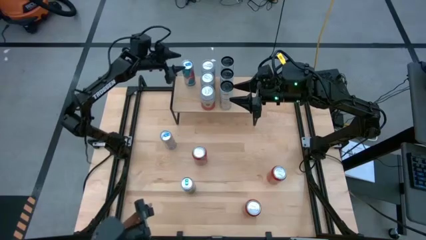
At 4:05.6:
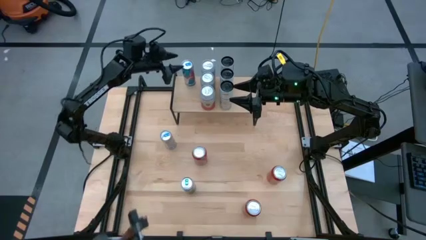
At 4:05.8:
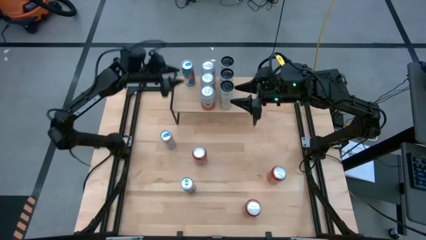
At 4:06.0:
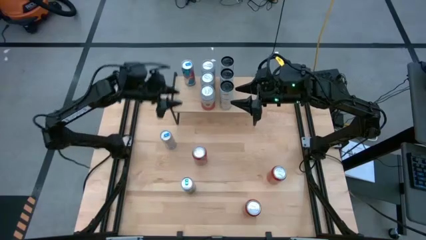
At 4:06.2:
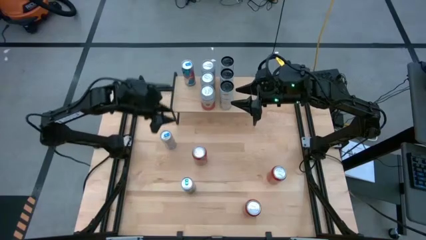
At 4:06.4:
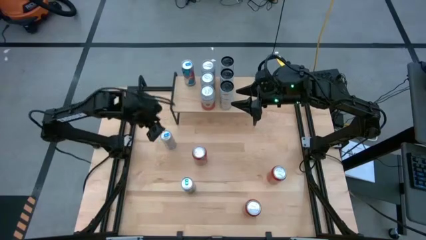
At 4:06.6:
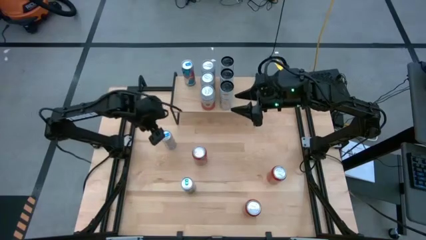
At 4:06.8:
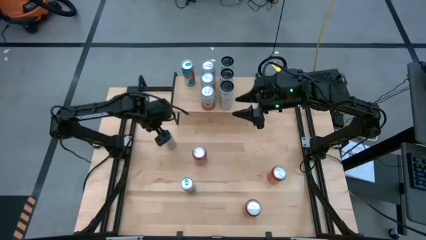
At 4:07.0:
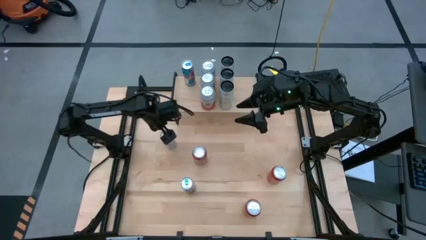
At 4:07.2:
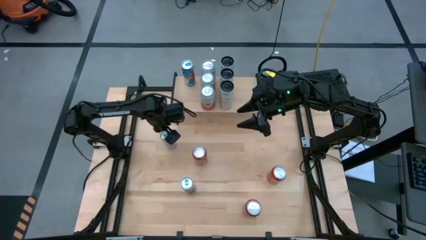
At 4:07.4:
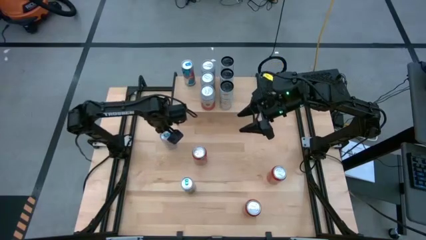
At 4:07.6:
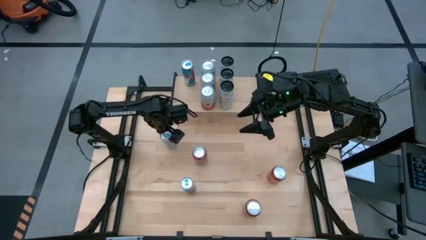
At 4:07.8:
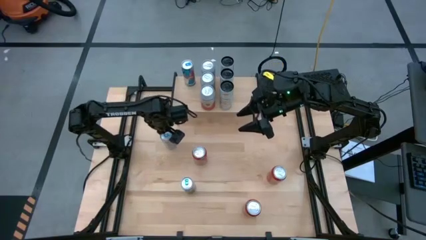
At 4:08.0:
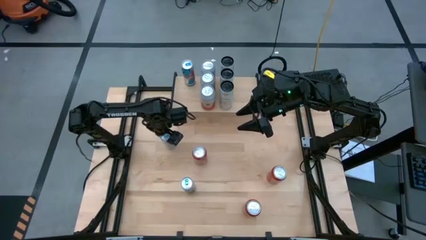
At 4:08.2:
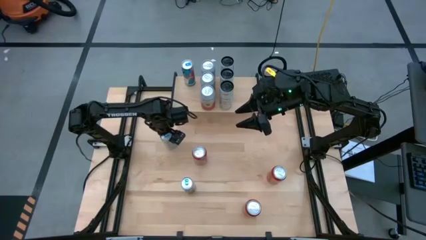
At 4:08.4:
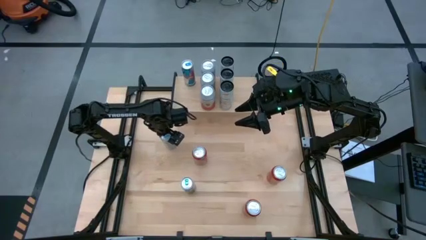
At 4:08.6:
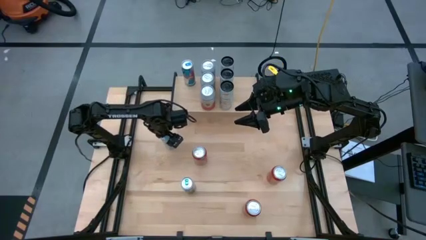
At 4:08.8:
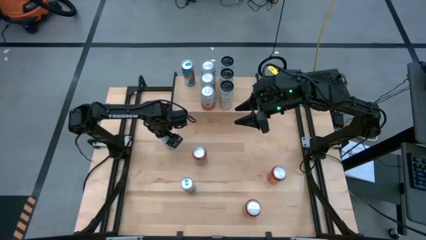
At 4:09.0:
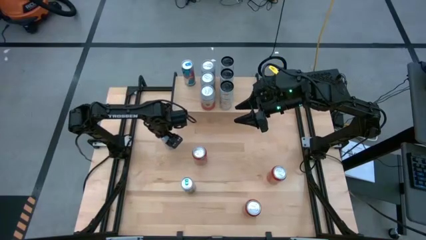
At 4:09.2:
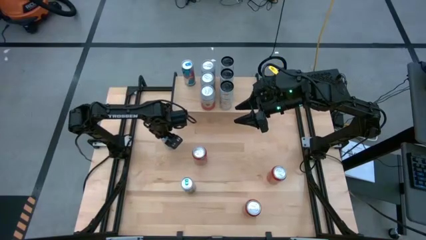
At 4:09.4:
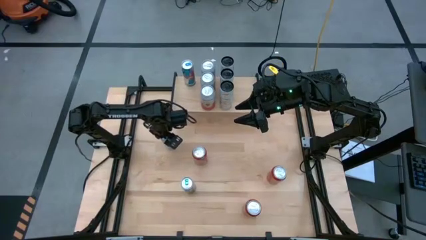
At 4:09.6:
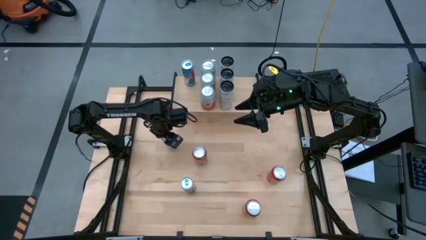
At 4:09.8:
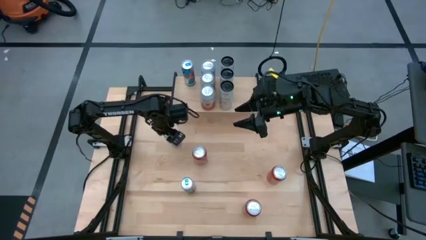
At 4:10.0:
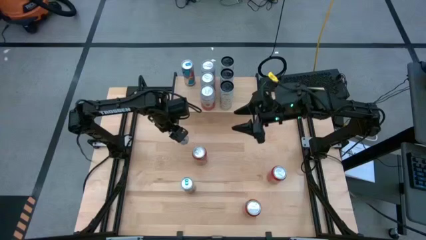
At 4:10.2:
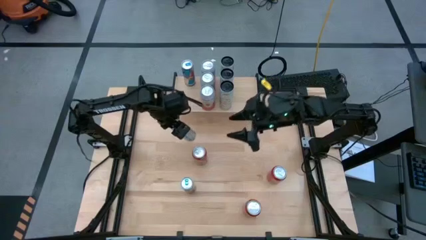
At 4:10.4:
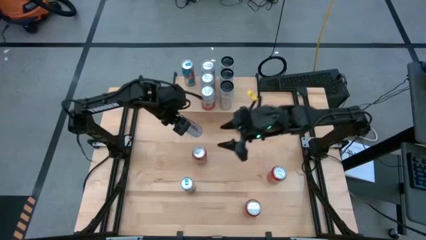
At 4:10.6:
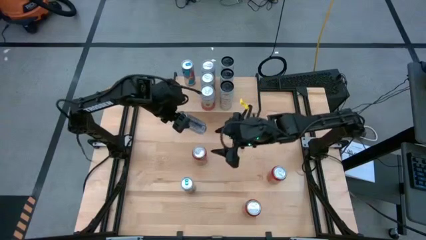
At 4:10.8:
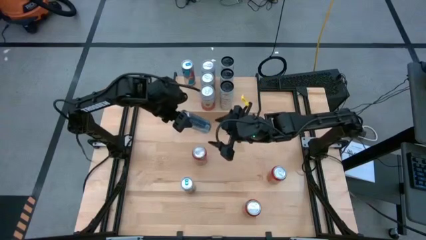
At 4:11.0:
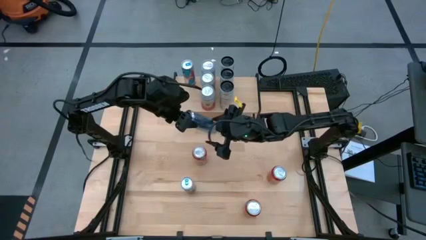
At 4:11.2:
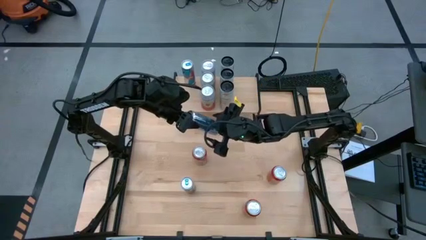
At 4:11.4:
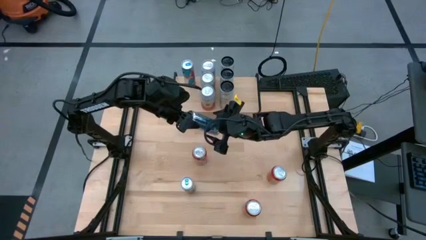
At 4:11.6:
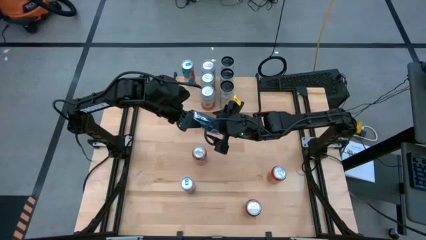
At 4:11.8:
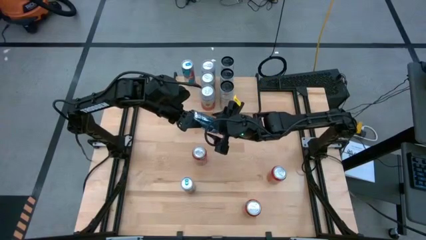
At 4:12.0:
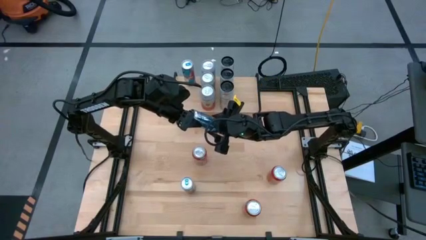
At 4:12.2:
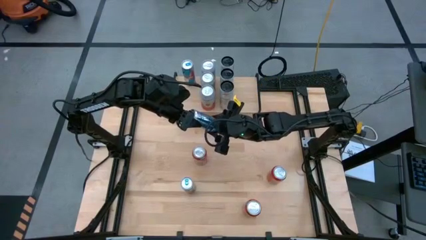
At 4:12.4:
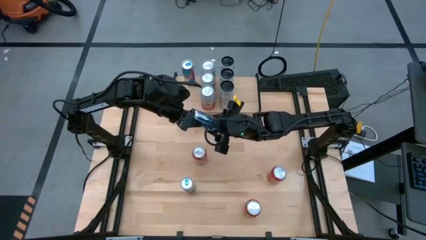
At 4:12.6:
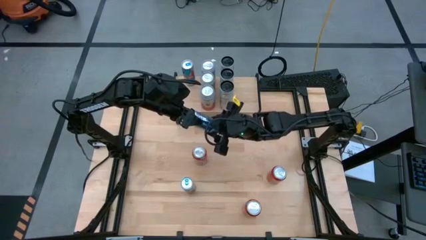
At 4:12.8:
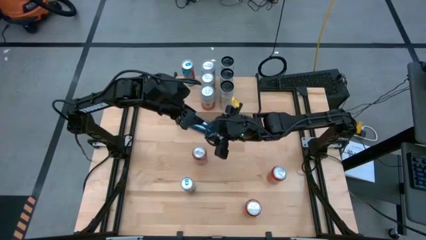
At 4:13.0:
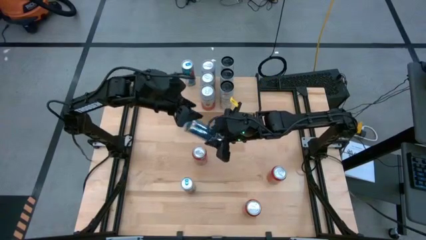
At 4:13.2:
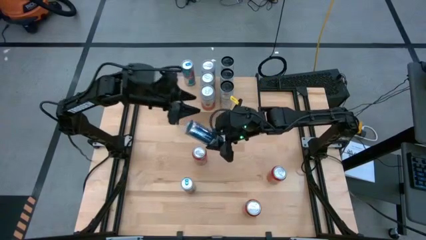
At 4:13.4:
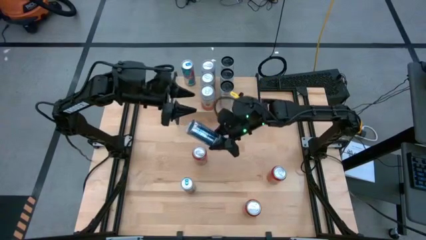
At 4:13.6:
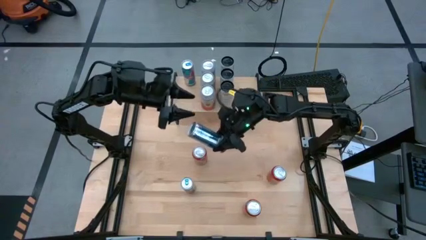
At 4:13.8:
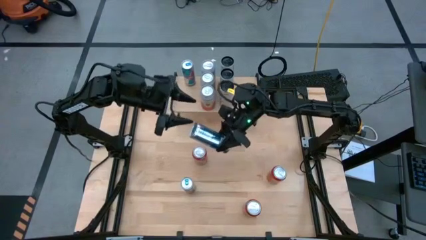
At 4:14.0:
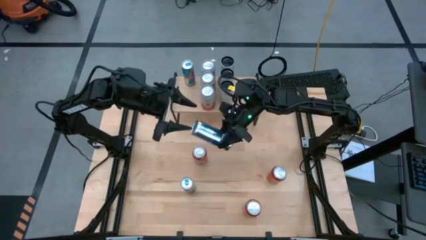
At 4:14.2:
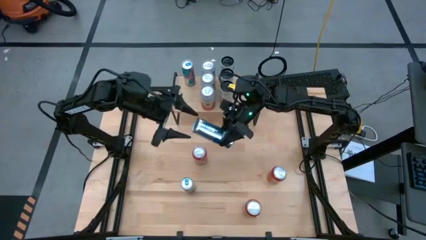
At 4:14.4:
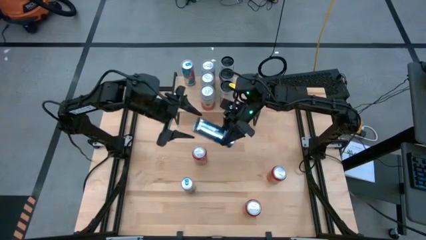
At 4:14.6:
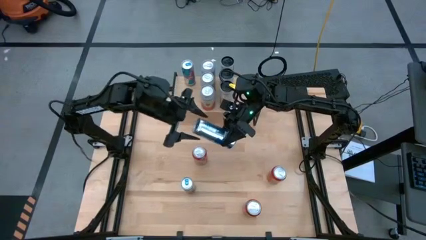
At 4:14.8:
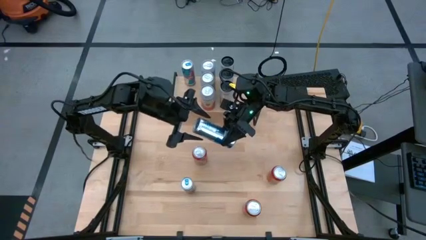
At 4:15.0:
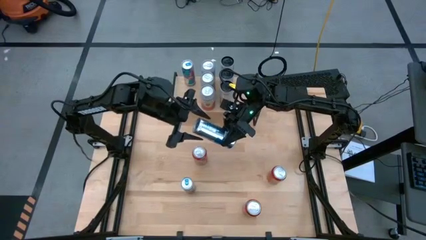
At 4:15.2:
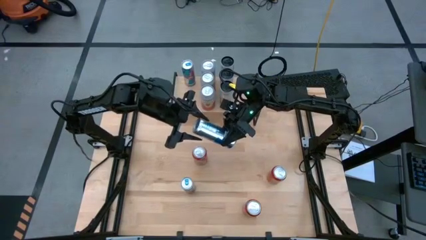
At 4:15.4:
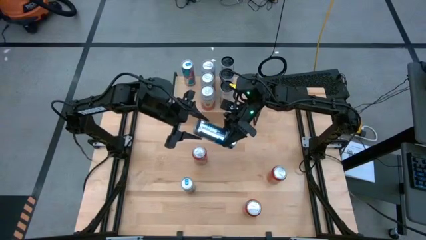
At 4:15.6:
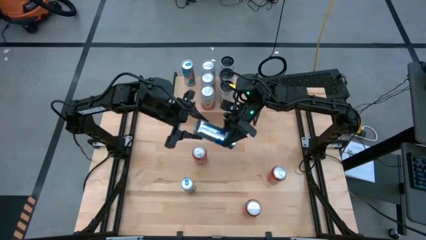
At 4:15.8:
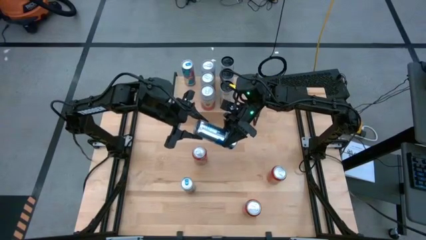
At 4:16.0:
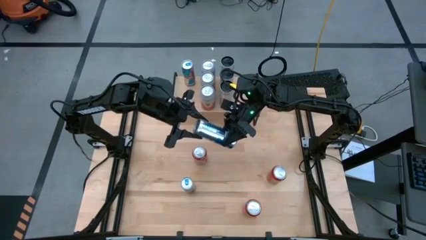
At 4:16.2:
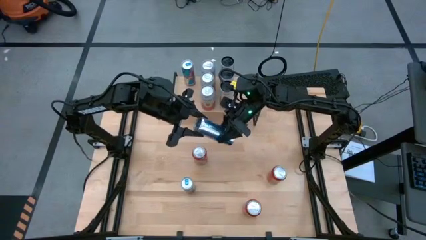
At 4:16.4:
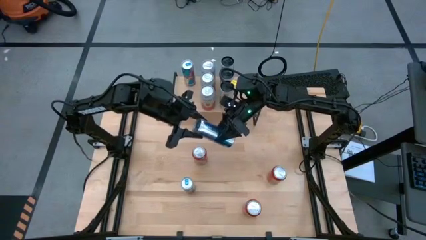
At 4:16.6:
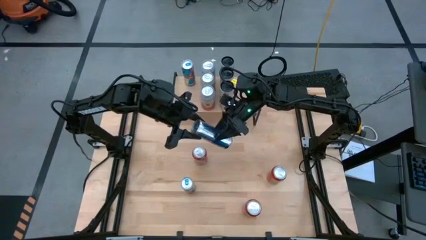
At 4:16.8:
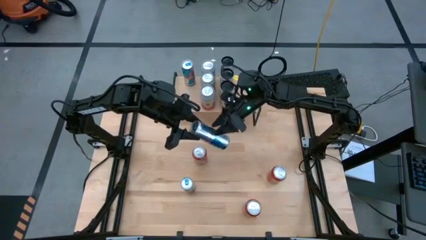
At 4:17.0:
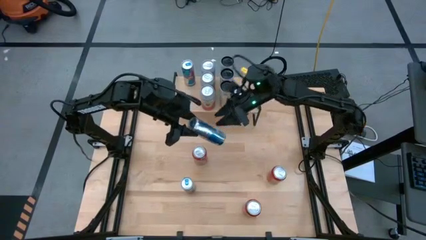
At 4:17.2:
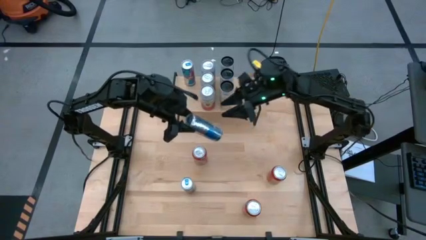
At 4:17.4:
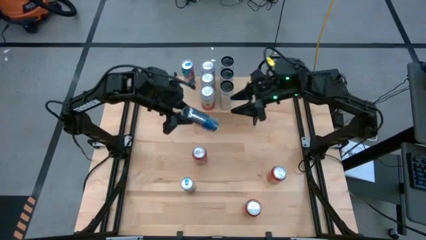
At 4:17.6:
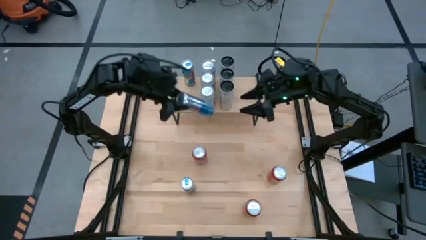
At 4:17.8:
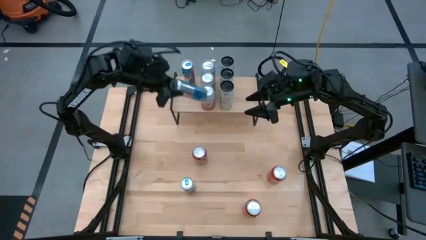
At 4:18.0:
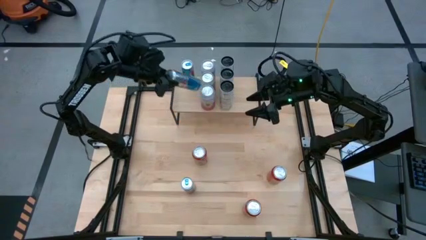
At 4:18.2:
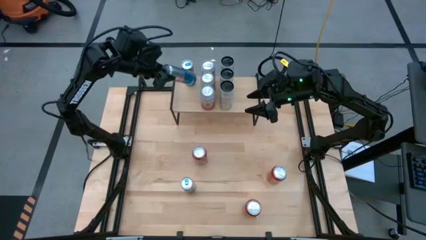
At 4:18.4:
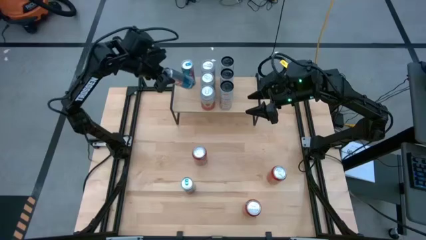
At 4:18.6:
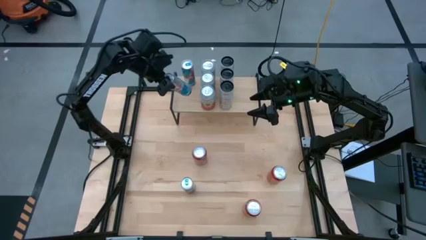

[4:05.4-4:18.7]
Task: Place canned beverage on shelf
Put the top blue soda can aligned with the other blue soda can on the shelf
